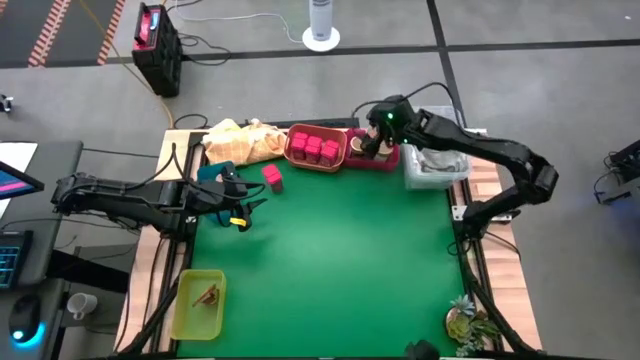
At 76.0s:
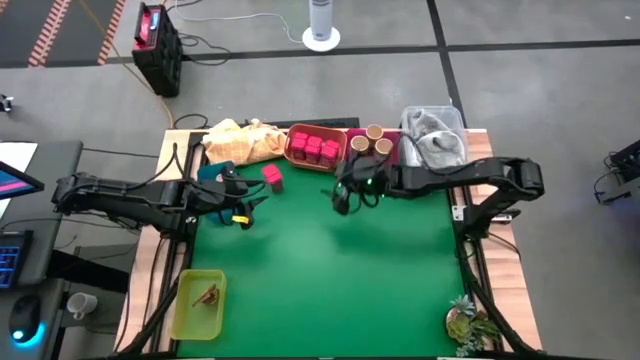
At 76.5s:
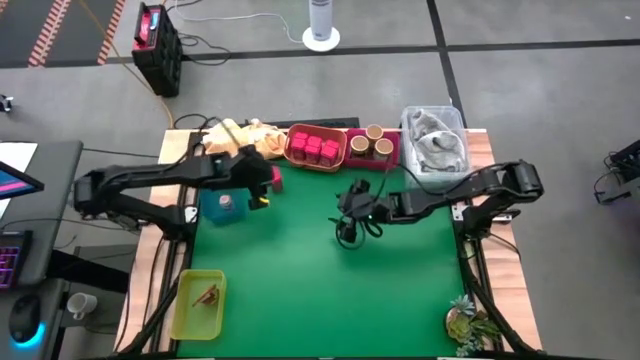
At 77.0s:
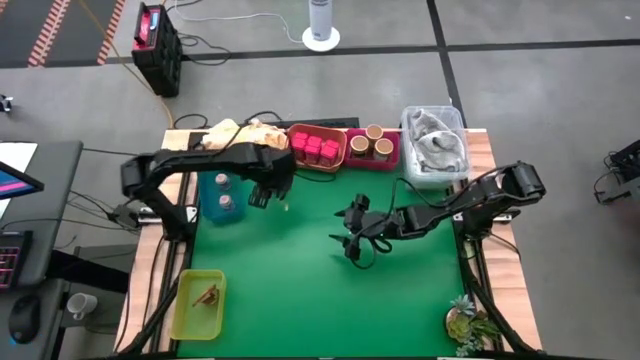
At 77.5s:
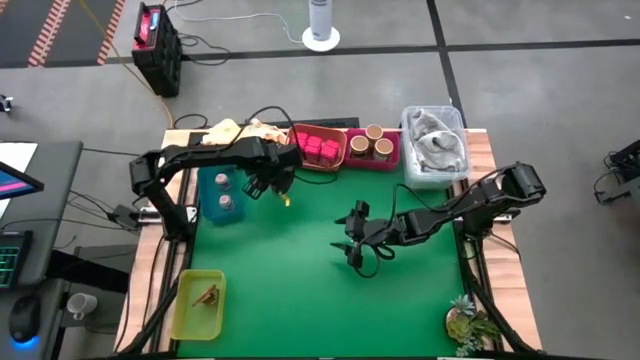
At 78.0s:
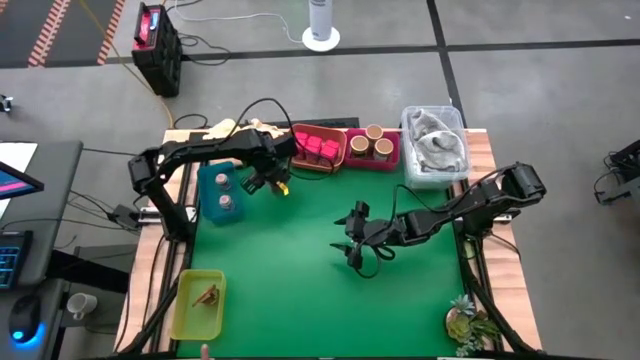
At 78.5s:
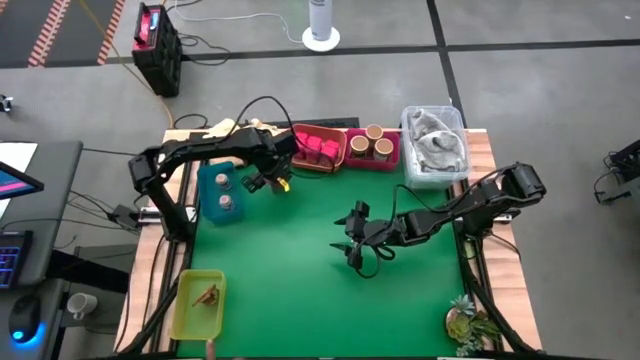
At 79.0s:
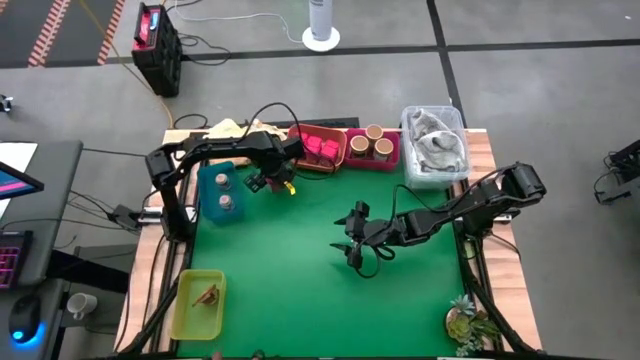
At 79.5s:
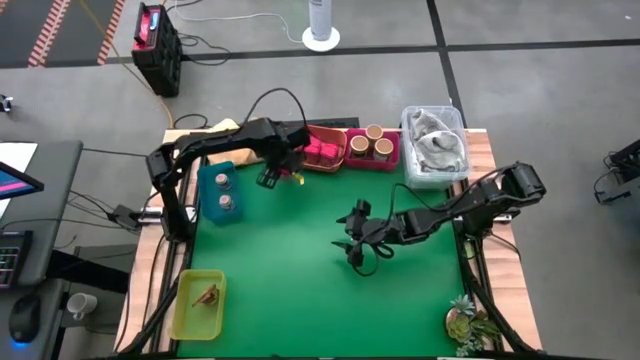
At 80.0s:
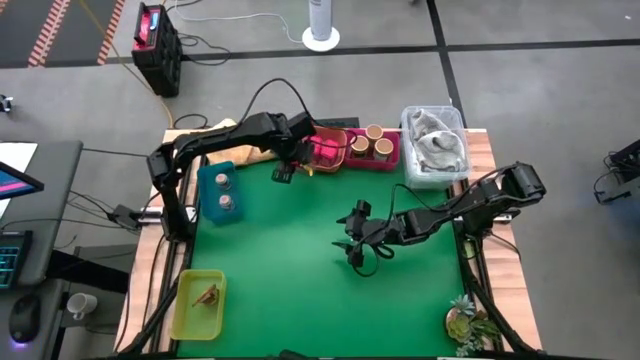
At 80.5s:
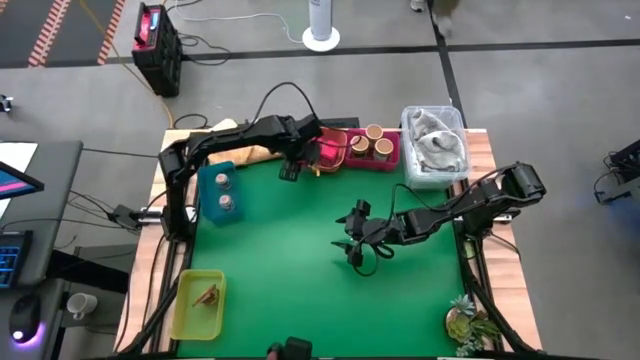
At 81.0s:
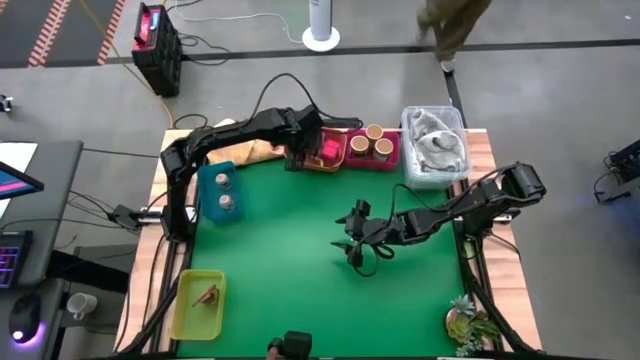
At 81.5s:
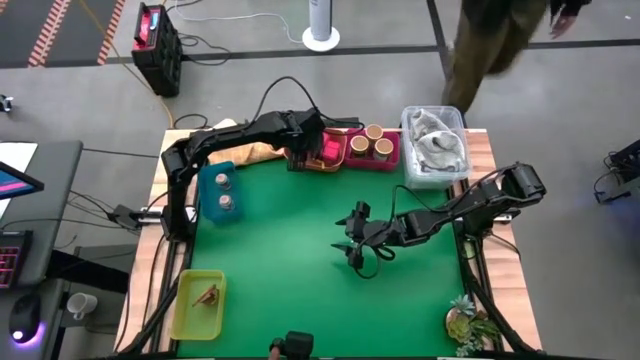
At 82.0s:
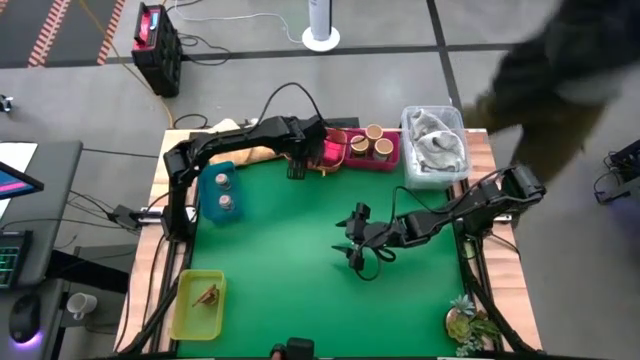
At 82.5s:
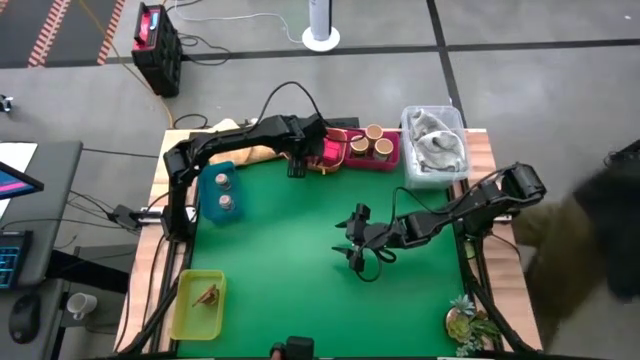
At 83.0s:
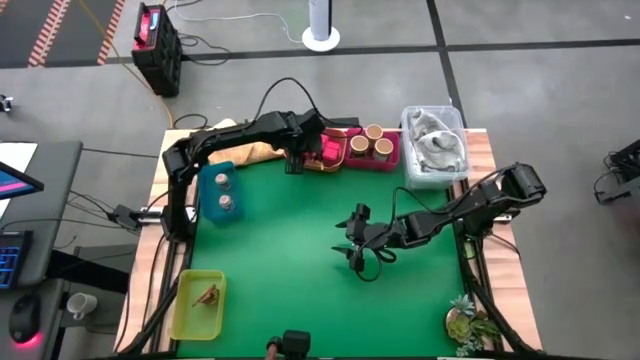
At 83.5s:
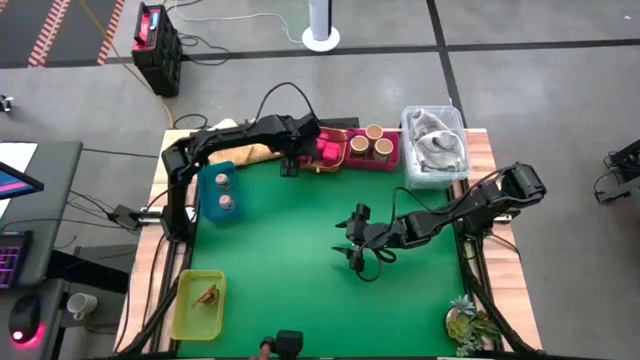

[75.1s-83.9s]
Task: Sort spices by type
Put the red seasoning can into the orange bin

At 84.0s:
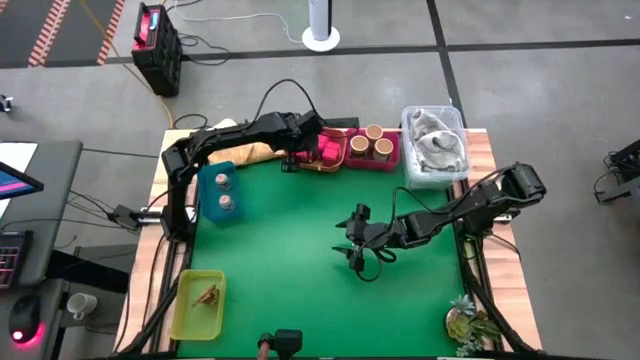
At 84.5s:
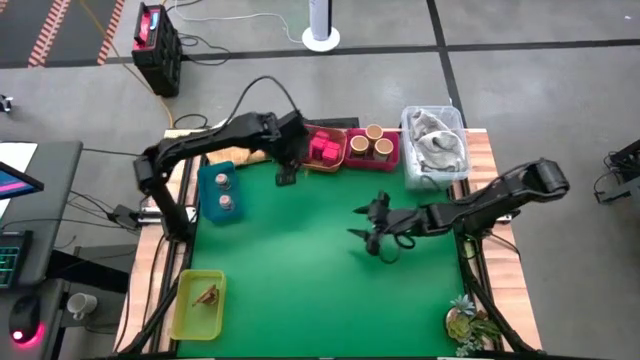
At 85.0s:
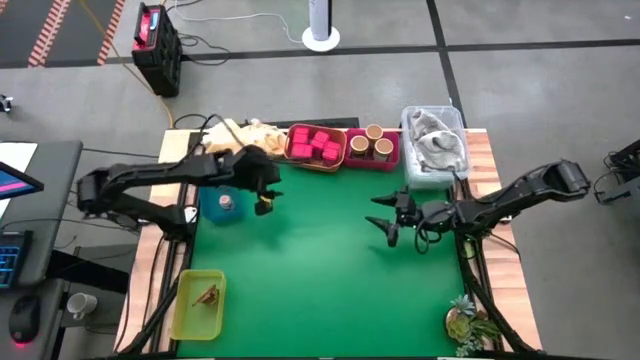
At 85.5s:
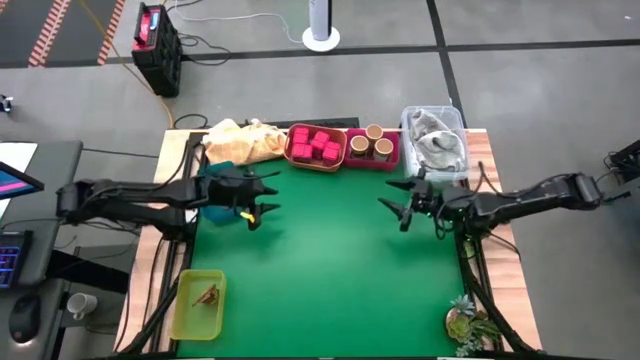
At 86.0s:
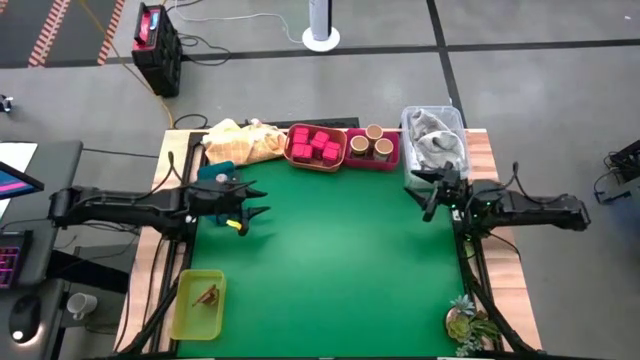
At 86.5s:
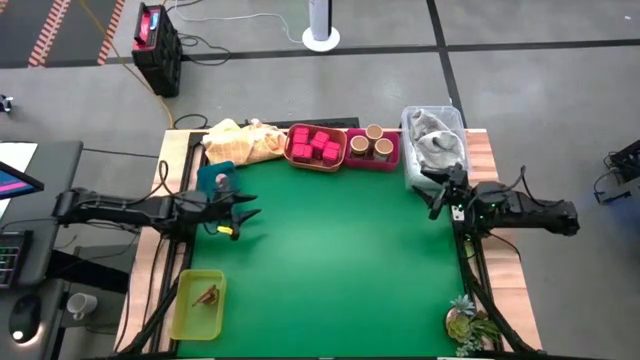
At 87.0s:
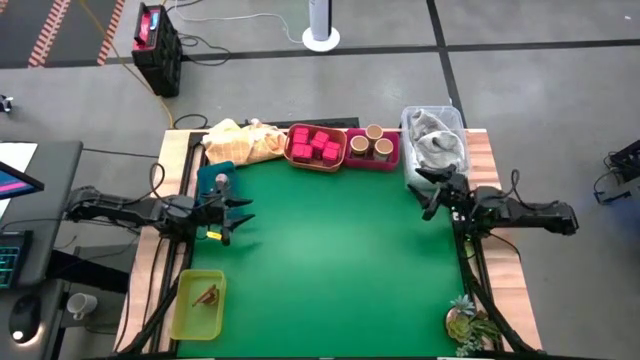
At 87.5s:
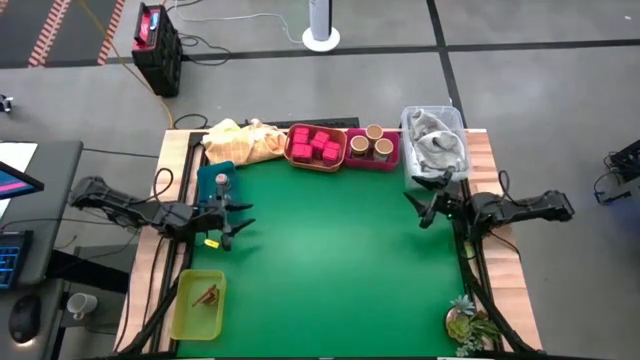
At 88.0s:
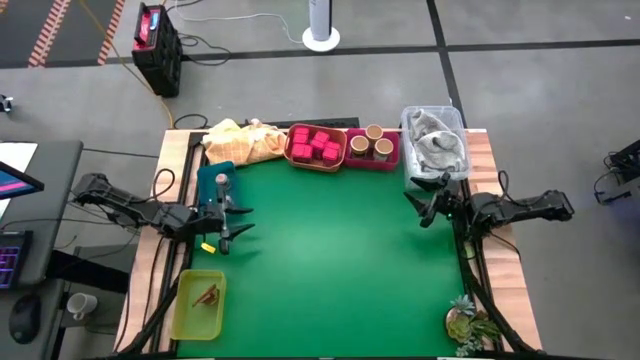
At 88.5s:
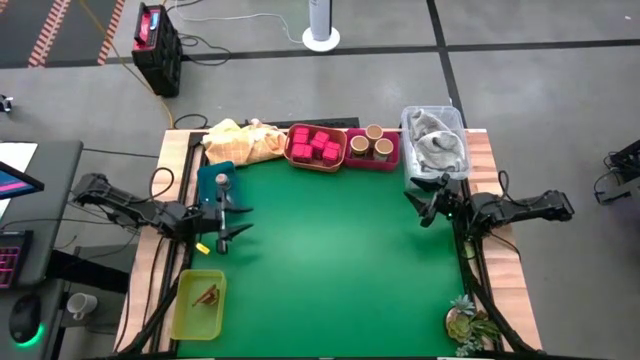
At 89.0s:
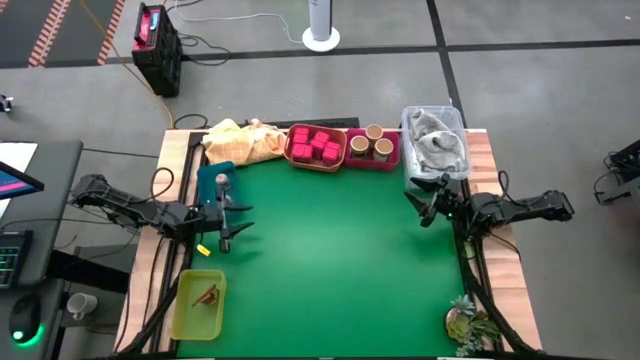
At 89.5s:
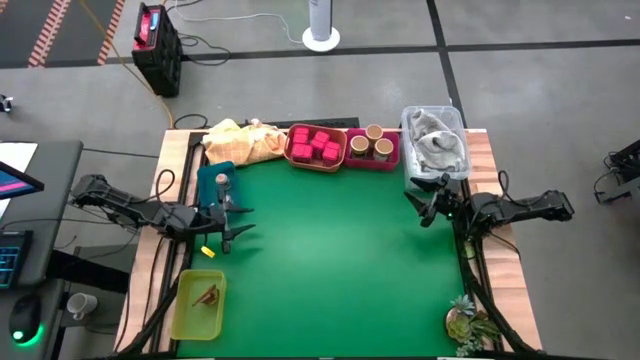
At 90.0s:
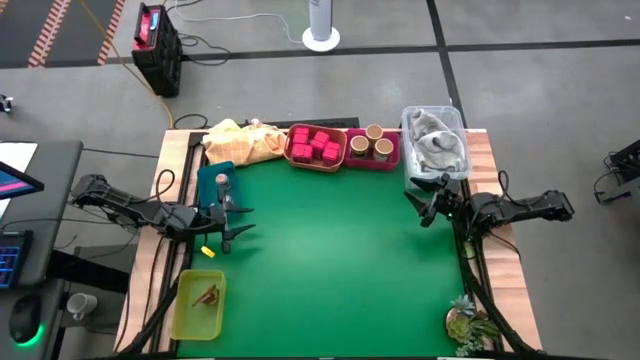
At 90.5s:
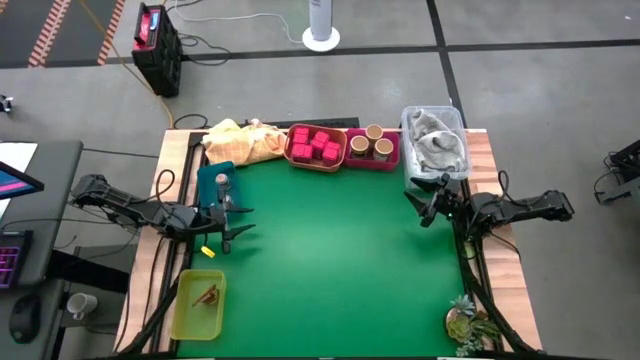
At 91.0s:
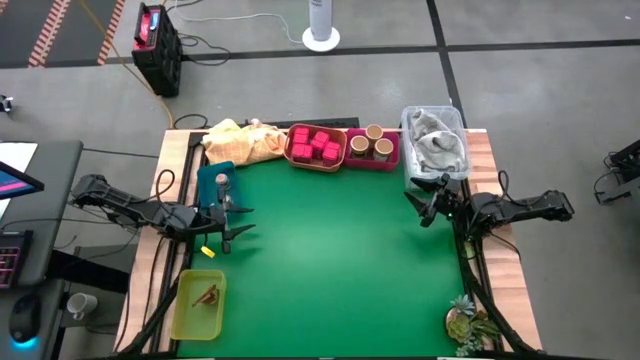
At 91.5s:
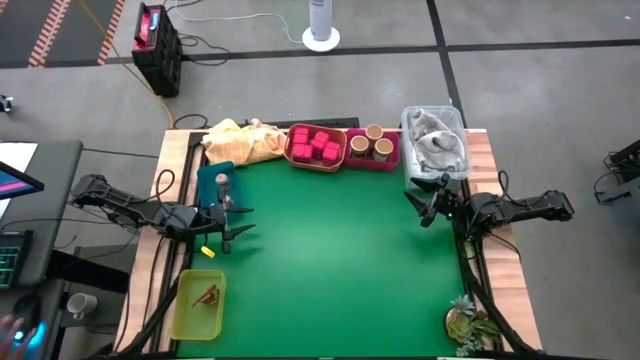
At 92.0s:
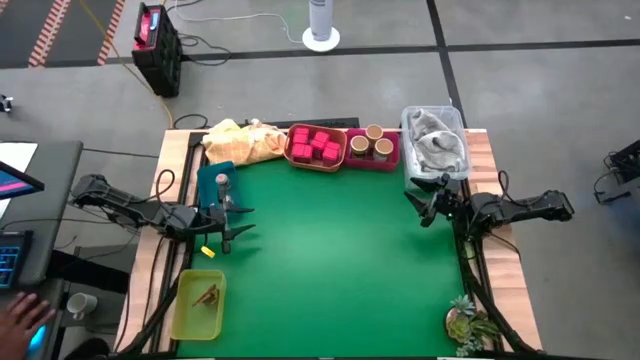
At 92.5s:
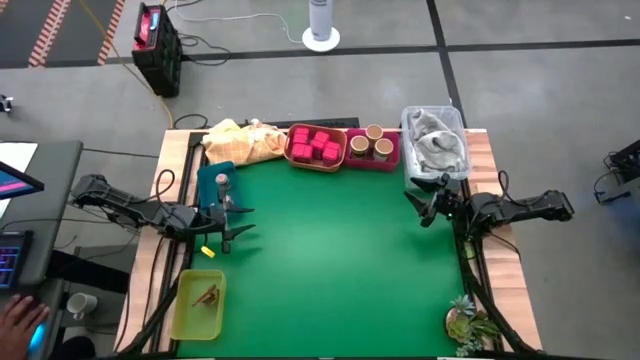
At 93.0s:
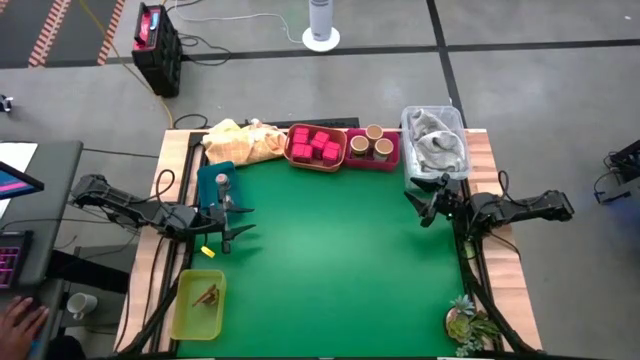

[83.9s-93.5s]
Return to Home Position

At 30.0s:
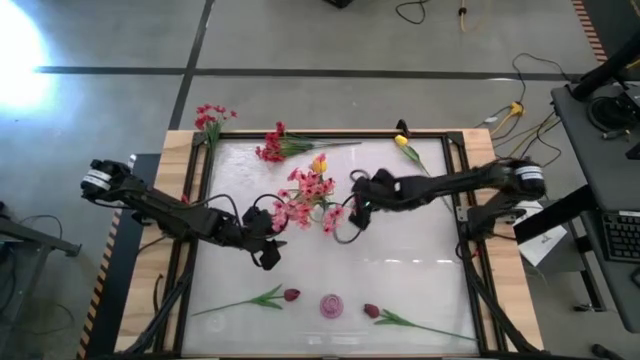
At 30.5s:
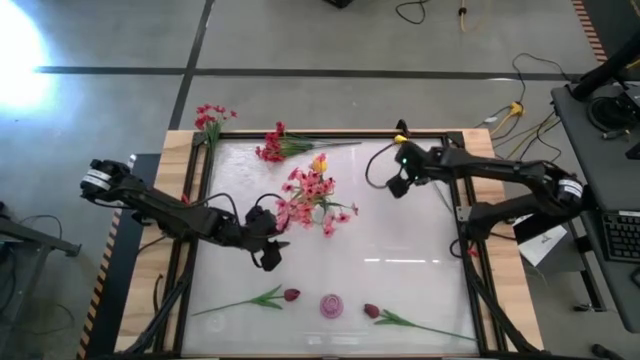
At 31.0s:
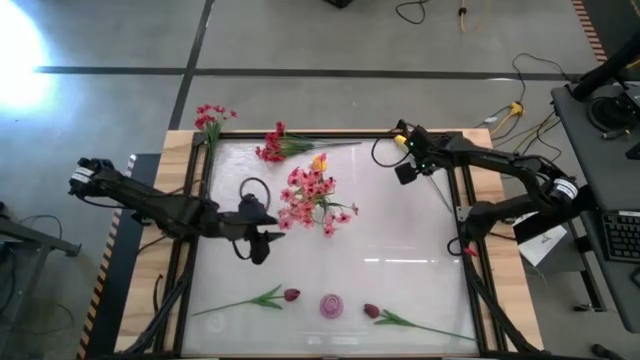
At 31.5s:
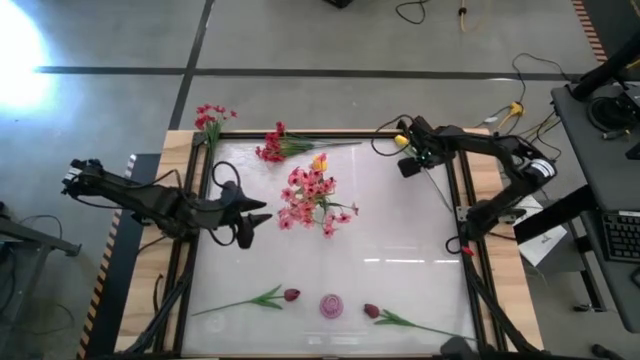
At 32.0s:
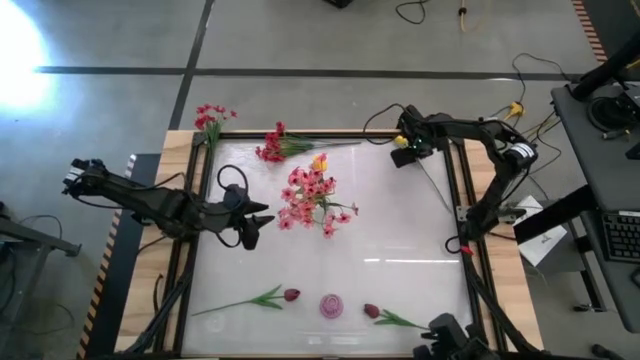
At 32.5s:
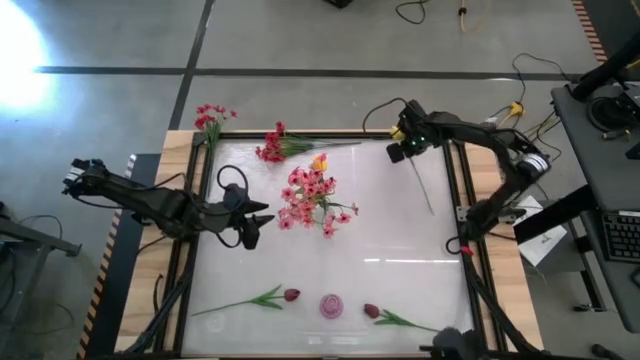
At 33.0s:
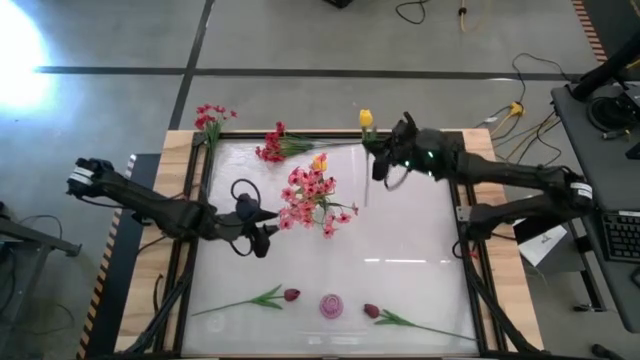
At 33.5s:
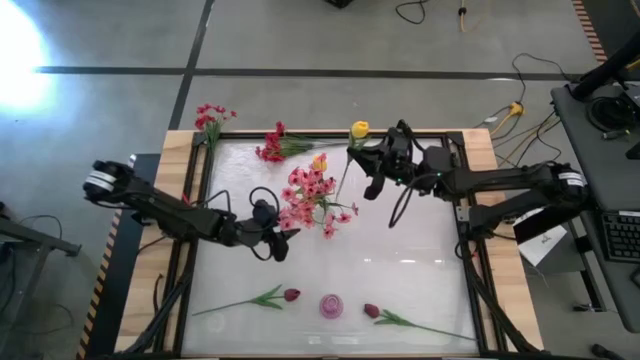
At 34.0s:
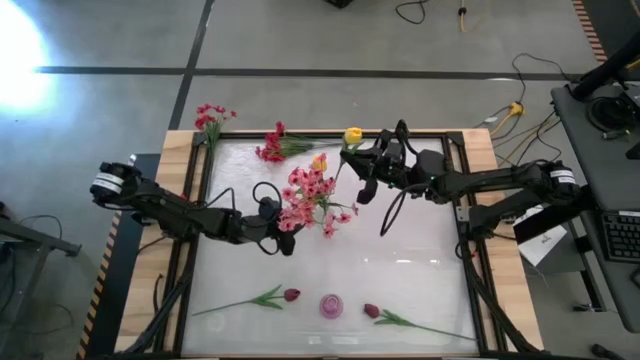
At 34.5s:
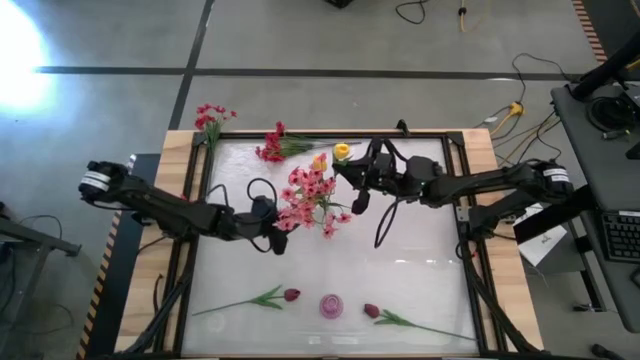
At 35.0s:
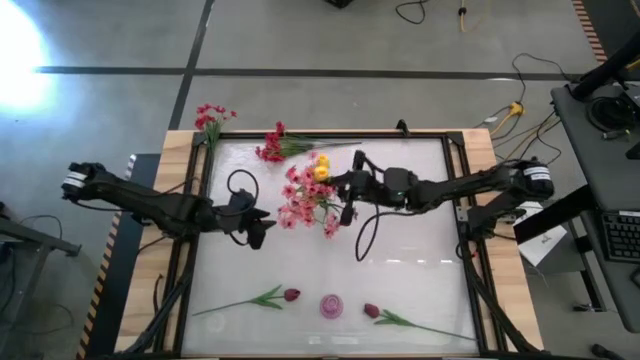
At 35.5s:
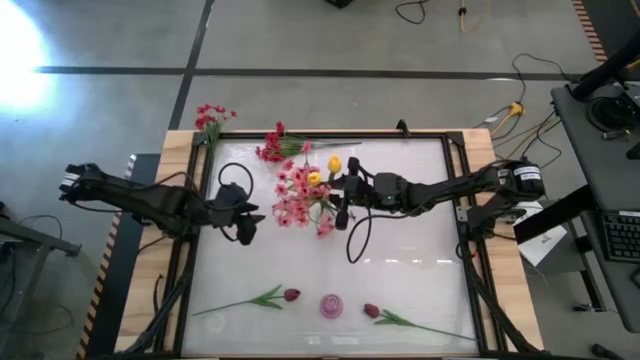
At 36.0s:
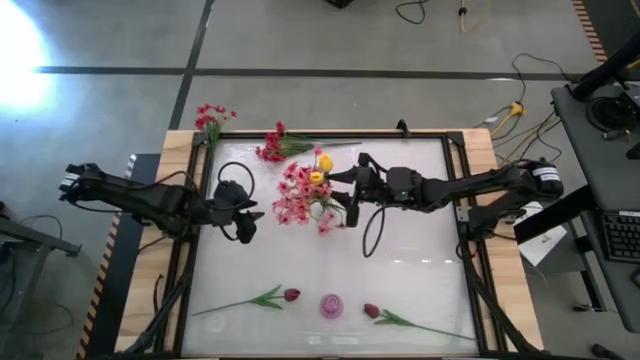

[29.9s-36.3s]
Task: Sort flowers into vase by color
Put the yellow flower into the transparent vase
